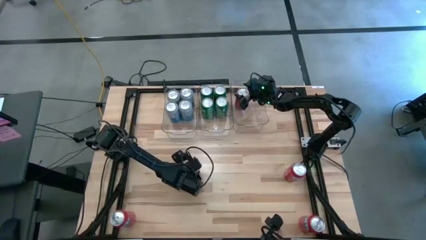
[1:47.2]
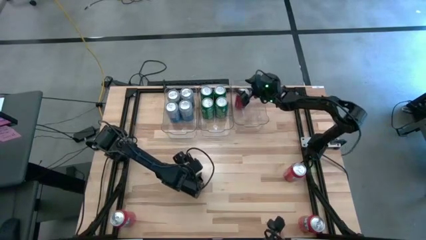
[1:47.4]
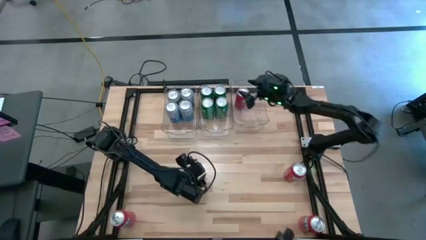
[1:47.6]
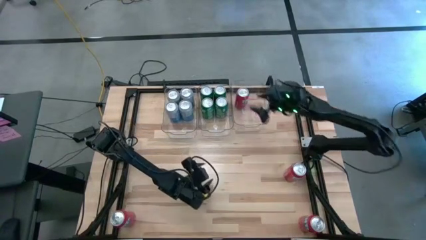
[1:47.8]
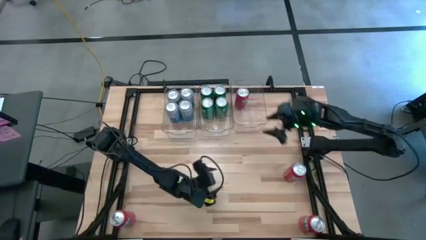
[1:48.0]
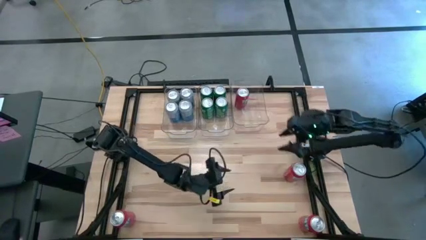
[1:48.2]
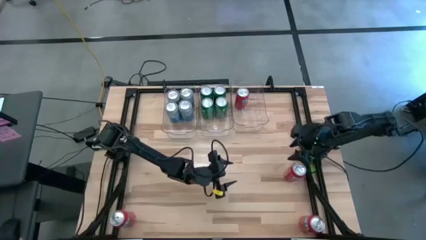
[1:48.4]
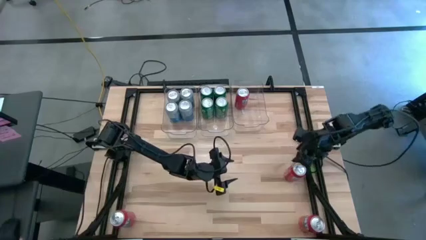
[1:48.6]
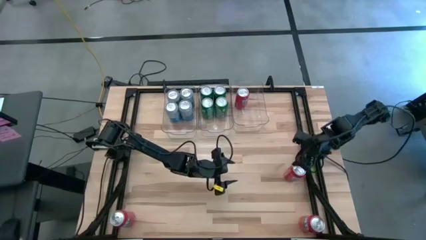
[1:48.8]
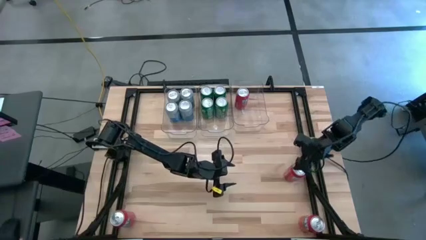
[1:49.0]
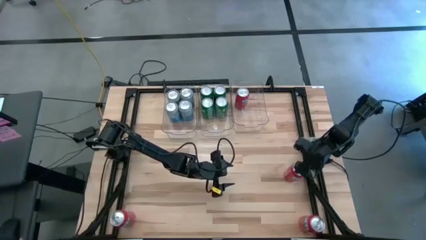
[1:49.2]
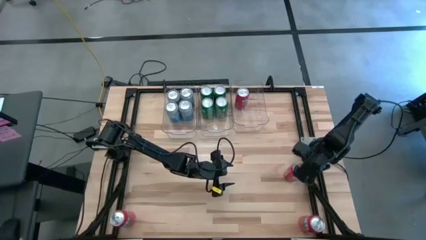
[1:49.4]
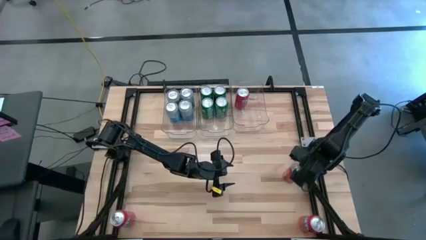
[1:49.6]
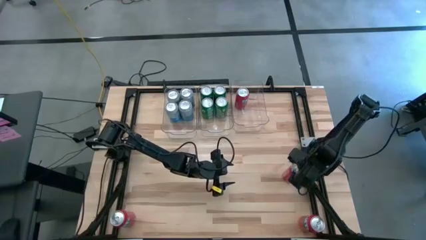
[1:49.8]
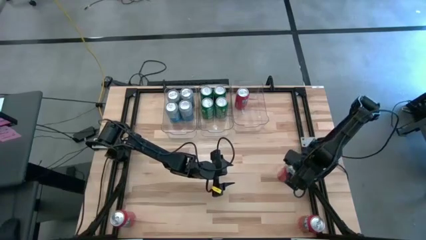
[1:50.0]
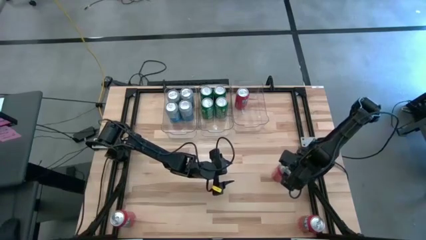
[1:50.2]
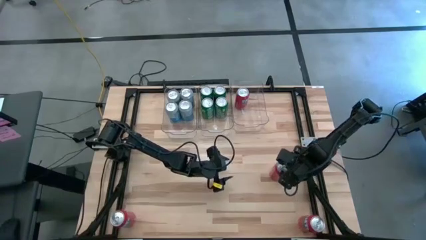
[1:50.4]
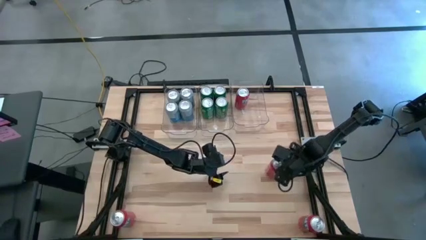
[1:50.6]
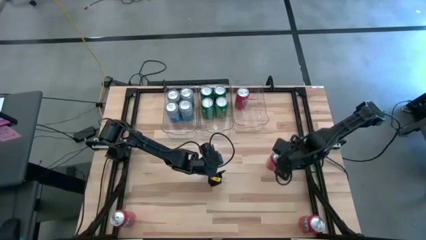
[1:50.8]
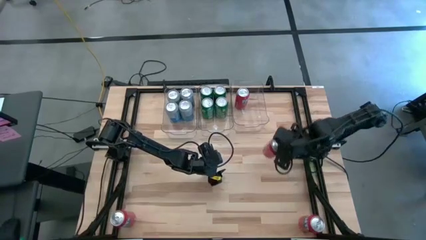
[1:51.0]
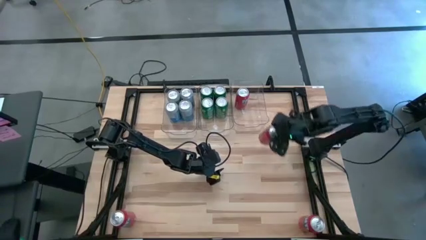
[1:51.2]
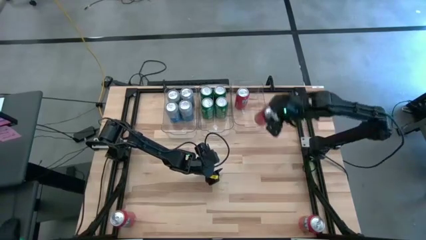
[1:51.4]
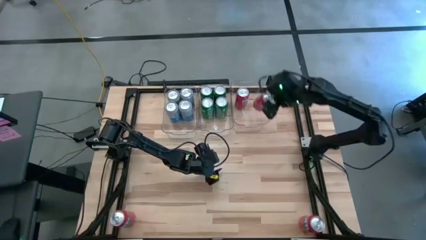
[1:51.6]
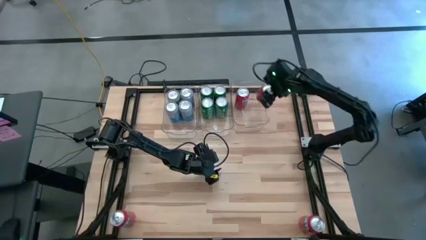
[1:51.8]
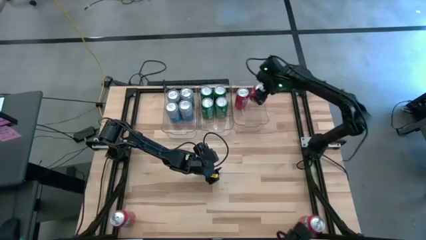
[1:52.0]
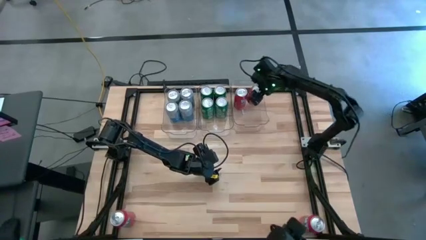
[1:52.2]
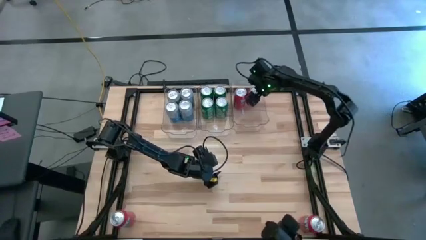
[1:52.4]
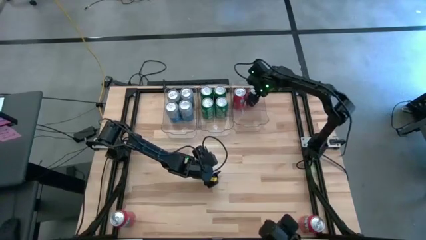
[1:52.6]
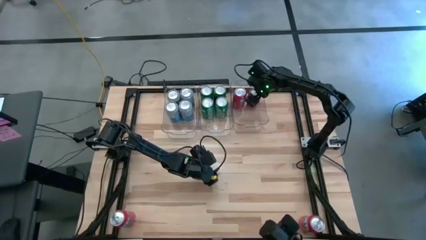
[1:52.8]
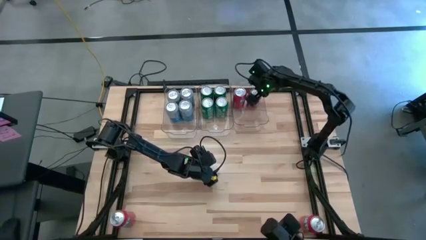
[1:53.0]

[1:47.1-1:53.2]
Task: Sort soda cans
Put the red soda can into the right transparent bin

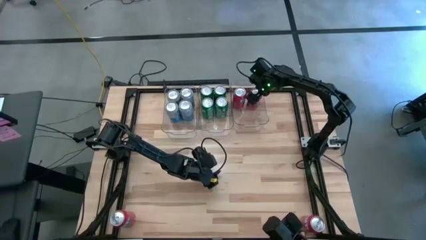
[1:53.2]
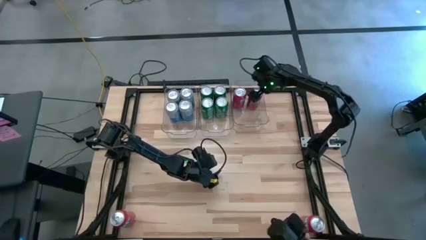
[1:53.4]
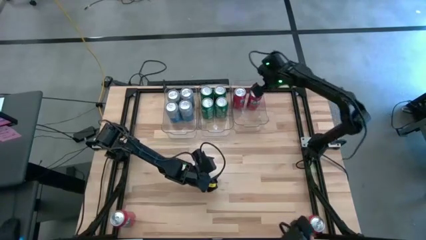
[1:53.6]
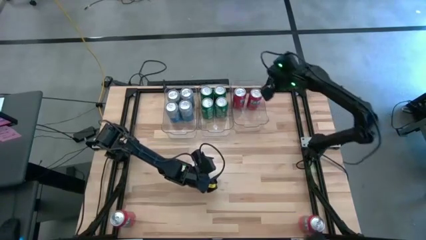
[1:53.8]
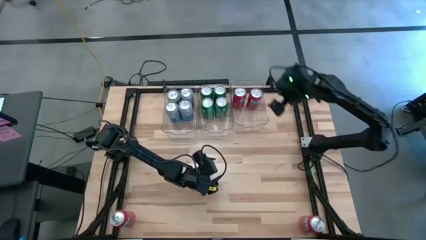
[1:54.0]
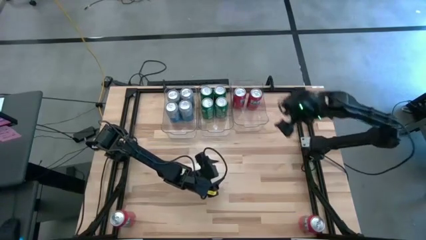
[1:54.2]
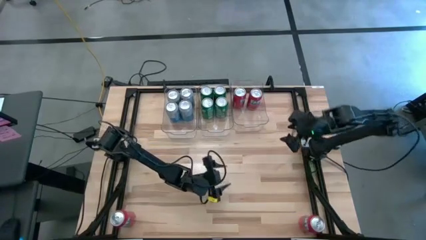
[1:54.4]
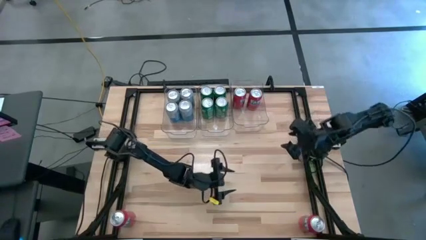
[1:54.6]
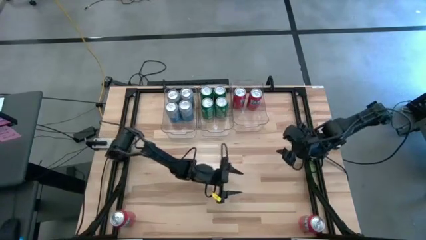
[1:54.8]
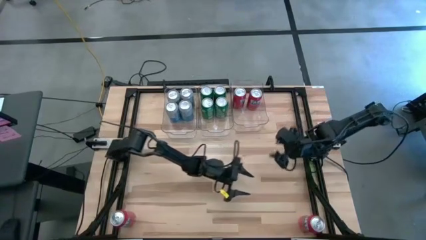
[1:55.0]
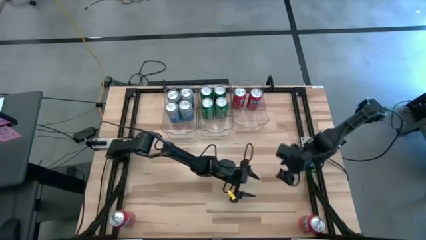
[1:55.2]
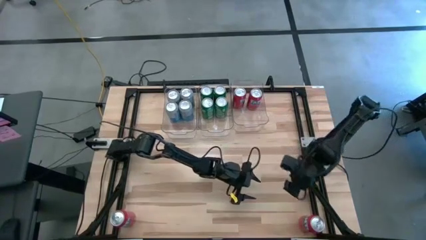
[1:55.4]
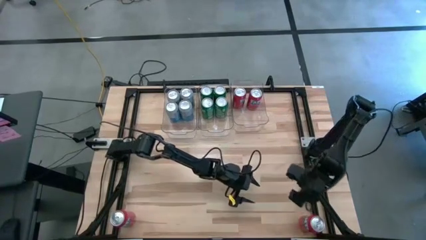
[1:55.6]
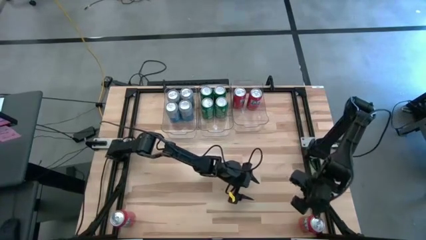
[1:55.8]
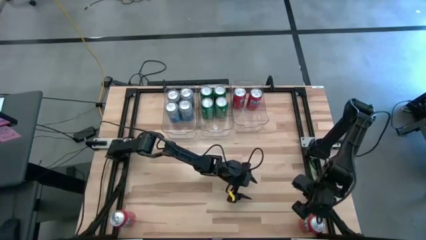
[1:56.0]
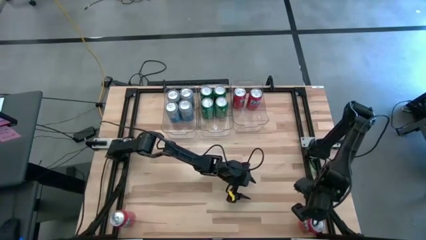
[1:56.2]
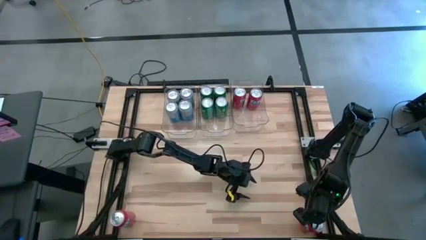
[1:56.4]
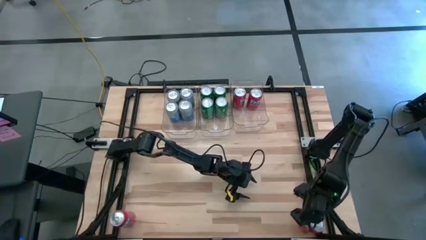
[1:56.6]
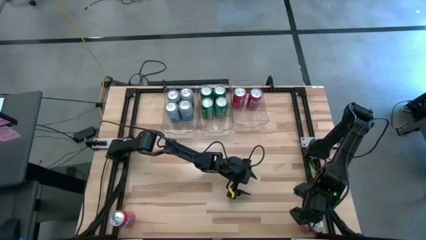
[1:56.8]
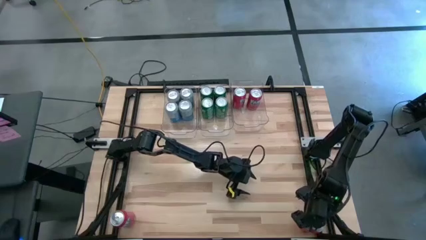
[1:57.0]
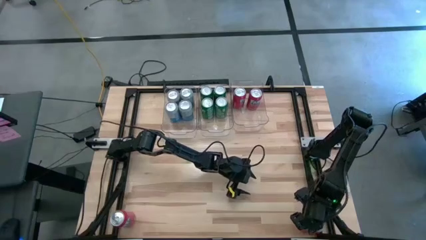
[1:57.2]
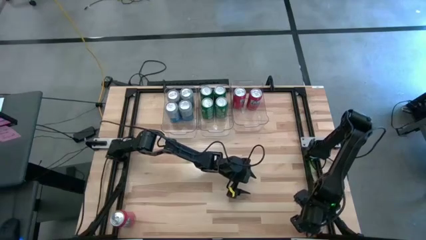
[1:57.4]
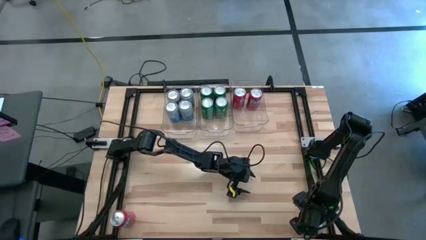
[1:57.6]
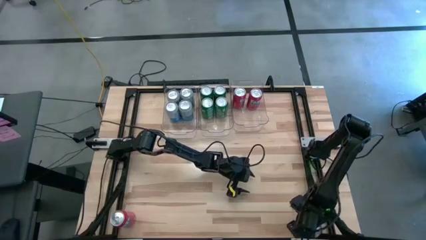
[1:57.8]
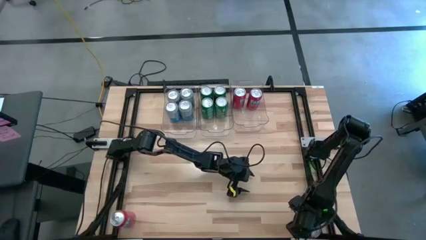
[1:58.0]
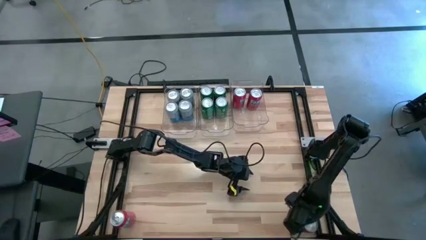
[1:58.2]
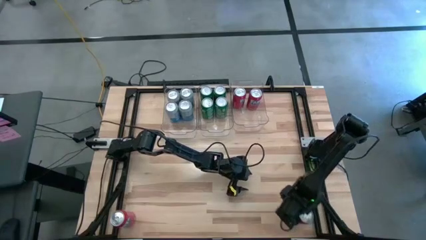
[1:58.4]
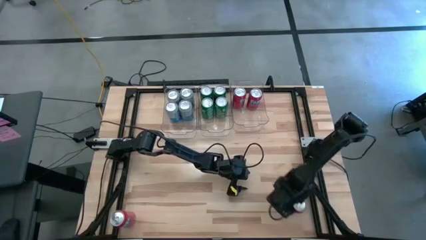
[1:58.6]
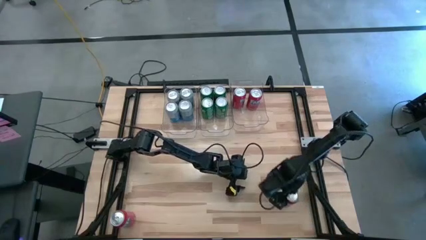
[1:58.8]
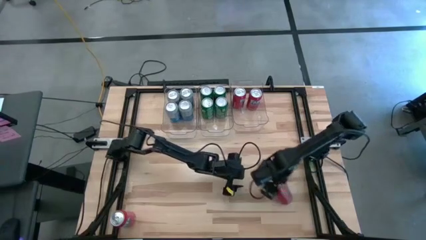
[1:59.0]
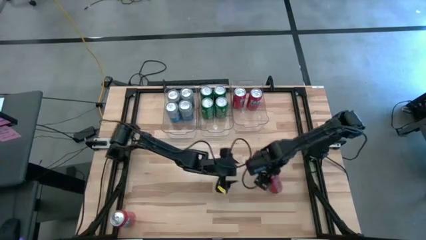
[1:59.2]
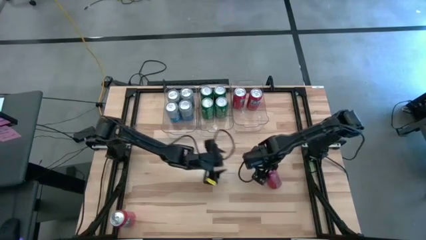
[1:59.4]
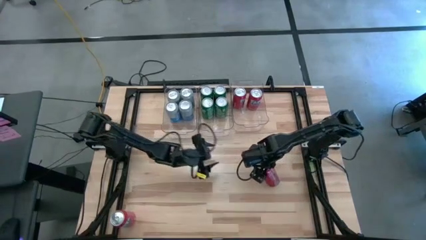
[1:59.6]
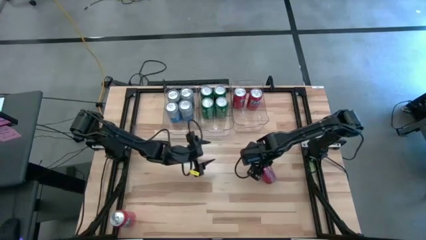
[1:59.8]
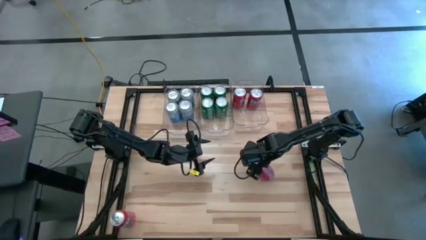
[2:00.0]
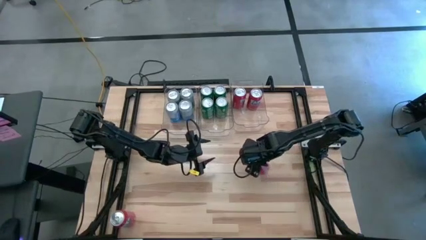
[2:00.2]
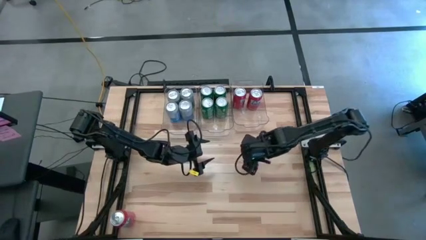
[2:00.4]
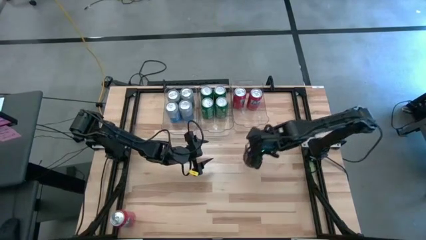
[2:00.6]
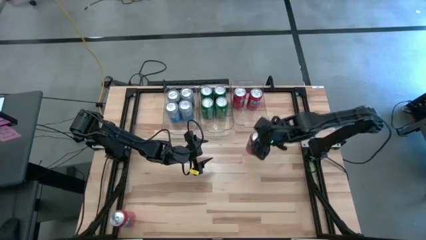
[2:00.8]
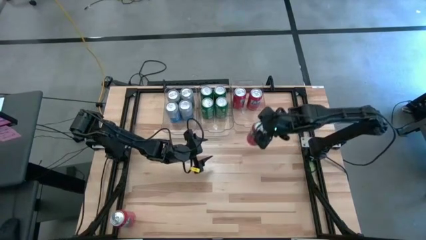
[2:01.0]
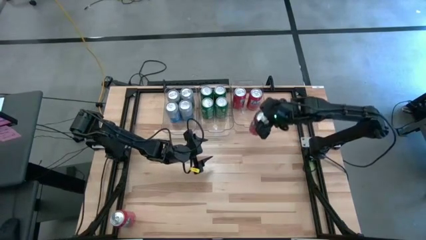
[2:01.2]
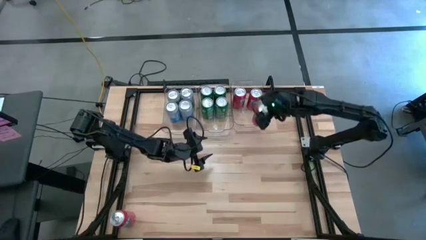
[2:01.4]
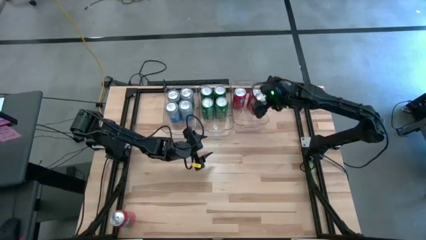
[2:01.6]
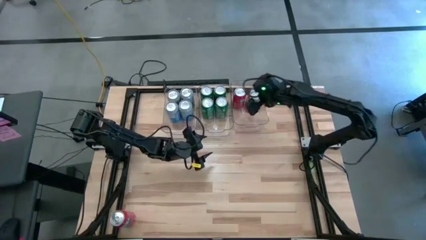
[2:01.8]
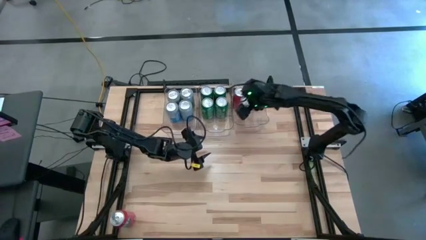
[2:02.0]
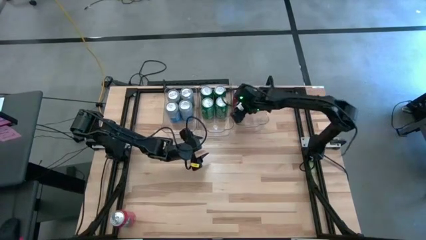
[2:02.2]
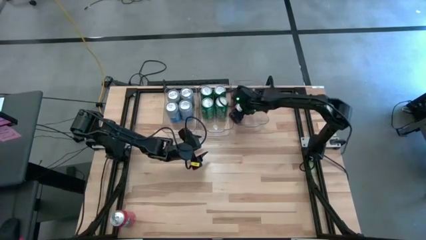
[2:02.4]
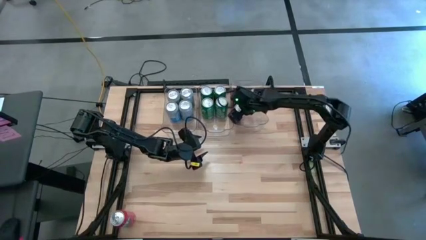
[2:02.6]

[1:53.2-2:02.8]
Put the right red soda can into the right transparent bin

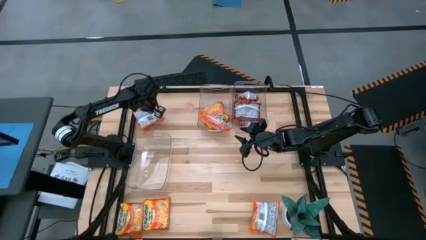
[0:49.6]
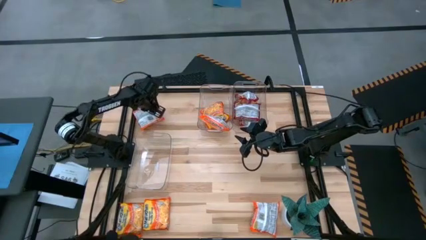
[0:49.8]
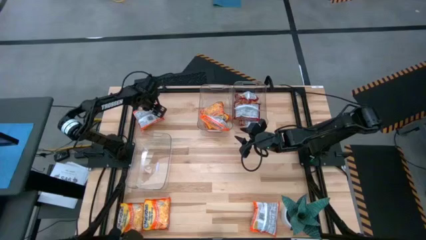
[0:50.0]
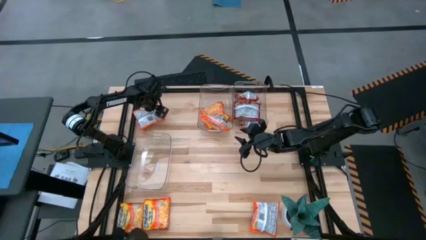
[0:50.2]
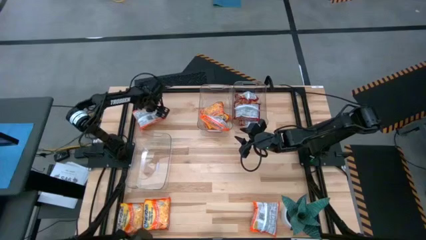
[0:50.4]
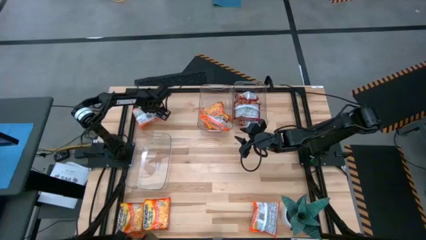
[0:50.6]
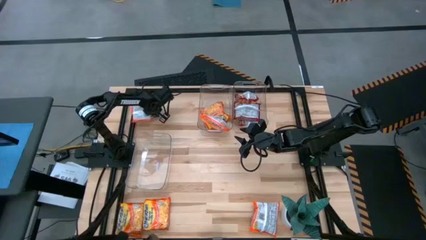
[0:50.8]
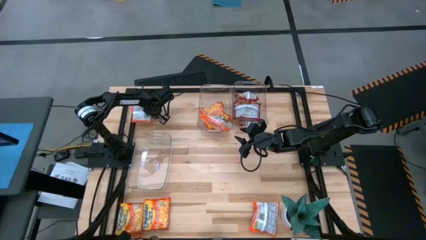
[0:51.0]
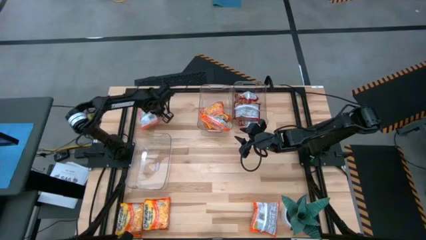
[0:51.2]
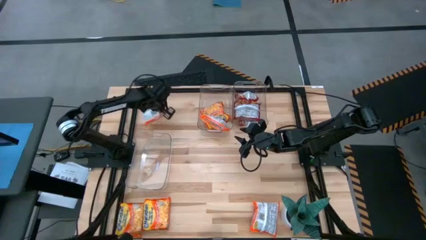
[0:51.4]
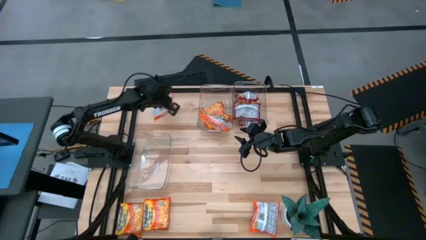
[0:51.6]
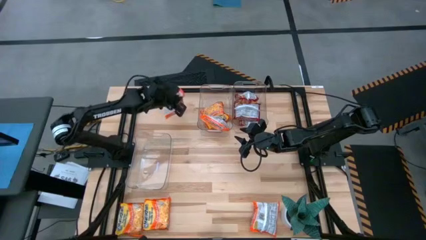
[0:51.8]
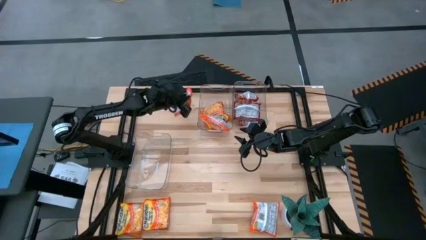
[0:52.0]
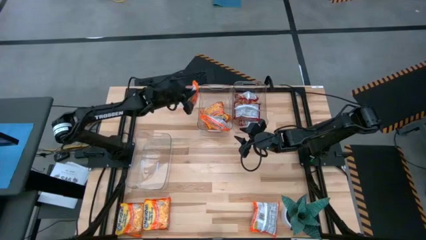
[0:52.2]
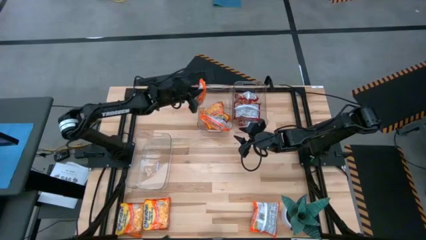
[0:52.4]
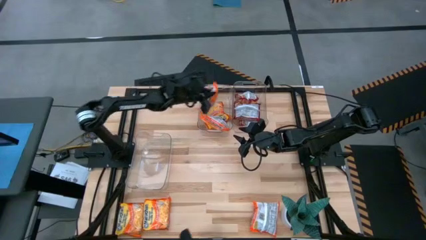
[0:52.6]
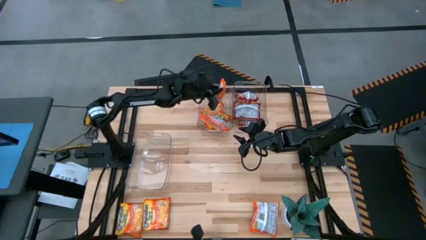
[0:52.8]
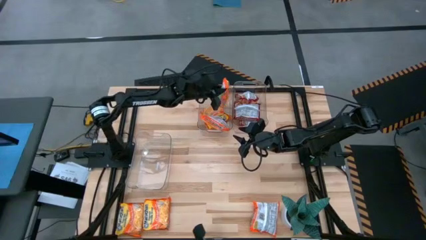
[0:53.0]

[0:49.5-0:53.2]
Task: Sort Maruchan noodles
Put the orange noodle pack into the top left transparent bin
